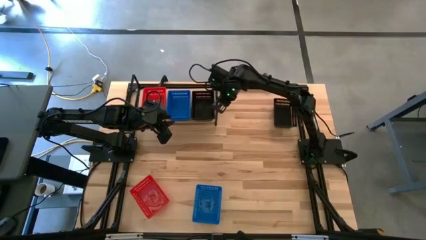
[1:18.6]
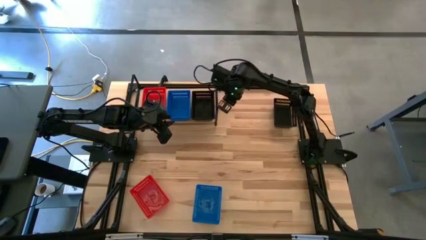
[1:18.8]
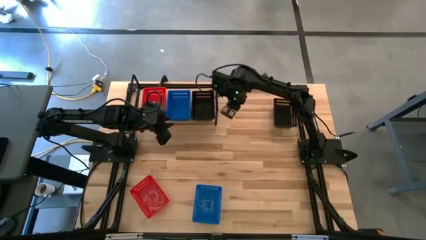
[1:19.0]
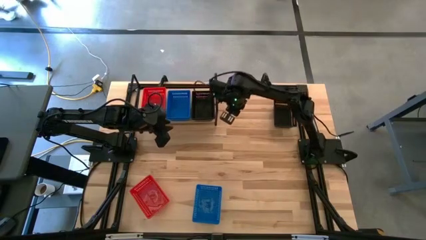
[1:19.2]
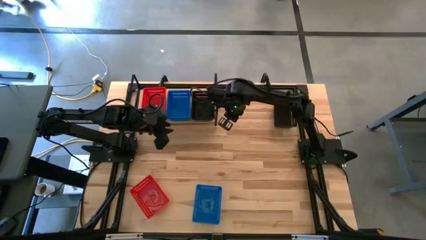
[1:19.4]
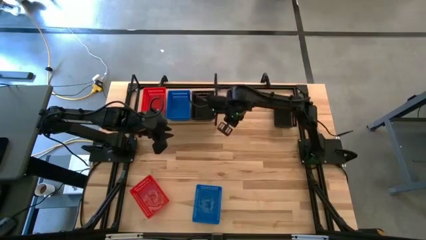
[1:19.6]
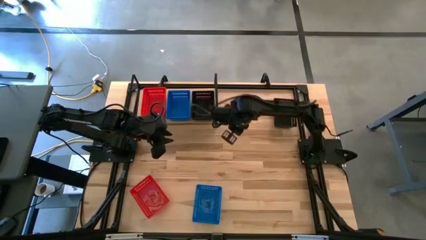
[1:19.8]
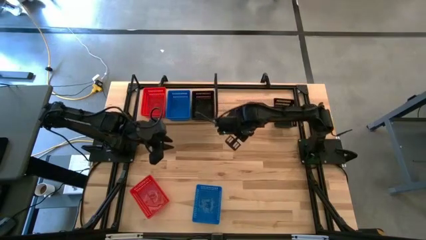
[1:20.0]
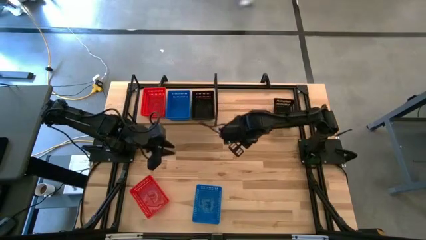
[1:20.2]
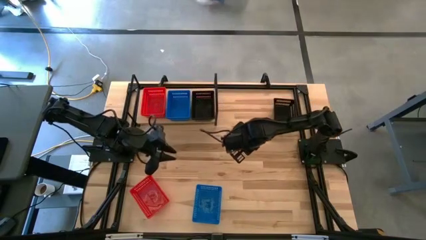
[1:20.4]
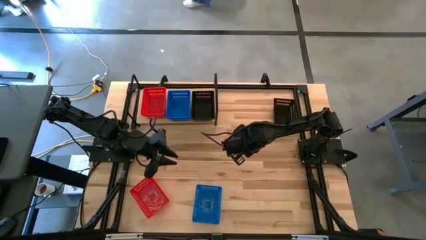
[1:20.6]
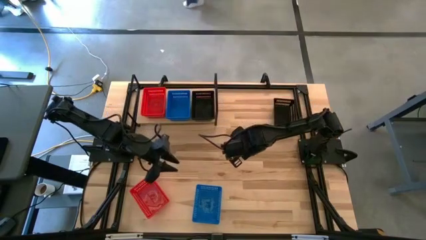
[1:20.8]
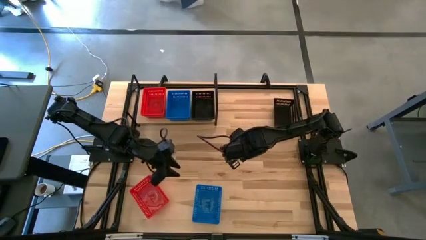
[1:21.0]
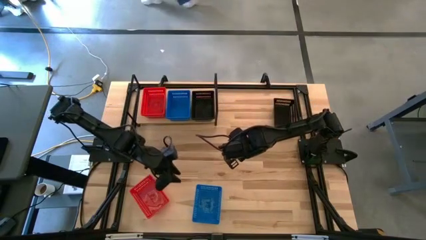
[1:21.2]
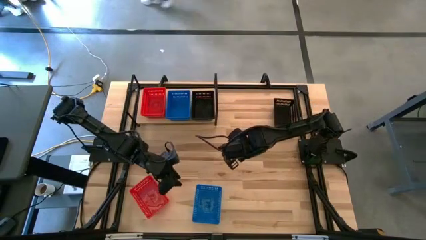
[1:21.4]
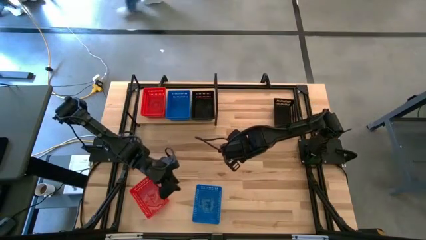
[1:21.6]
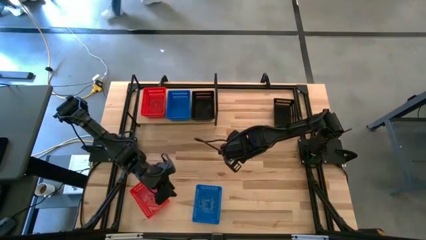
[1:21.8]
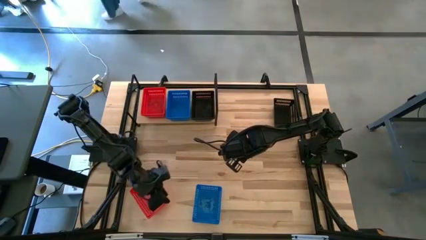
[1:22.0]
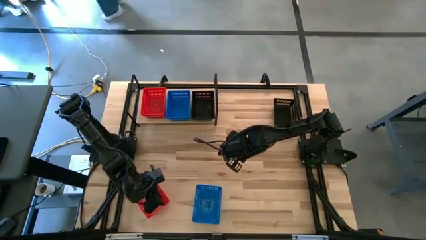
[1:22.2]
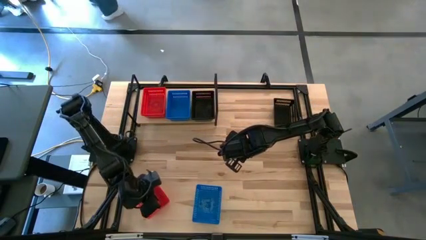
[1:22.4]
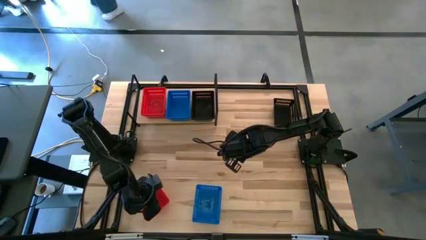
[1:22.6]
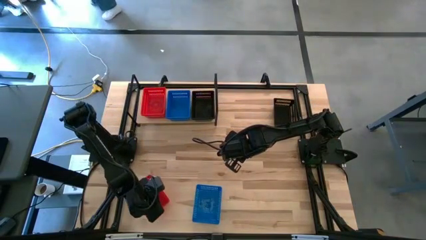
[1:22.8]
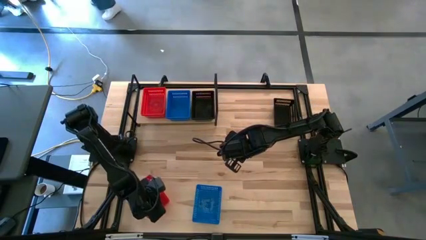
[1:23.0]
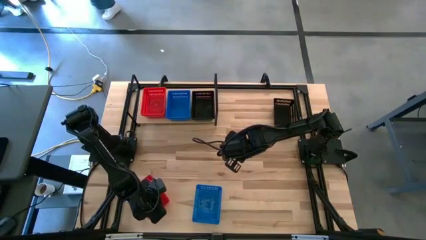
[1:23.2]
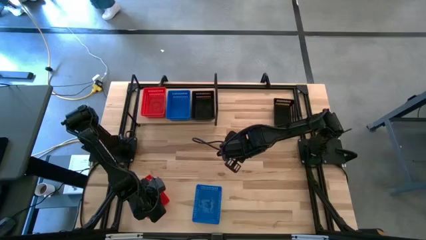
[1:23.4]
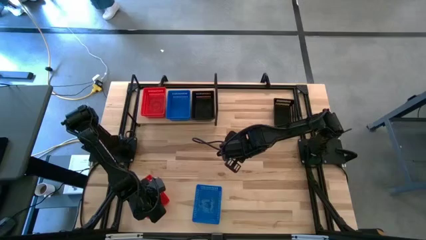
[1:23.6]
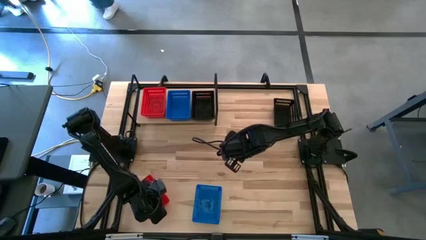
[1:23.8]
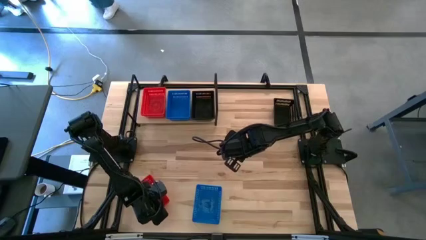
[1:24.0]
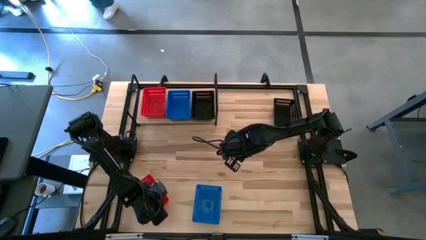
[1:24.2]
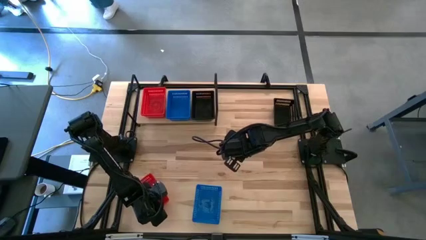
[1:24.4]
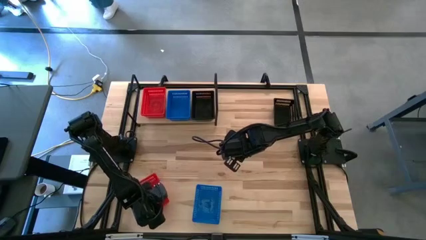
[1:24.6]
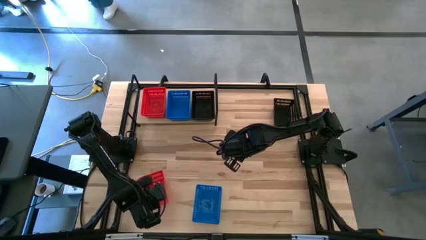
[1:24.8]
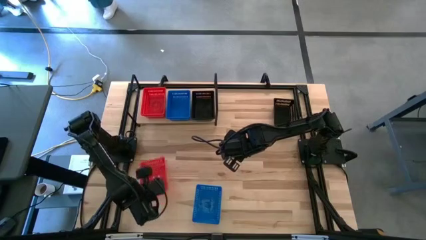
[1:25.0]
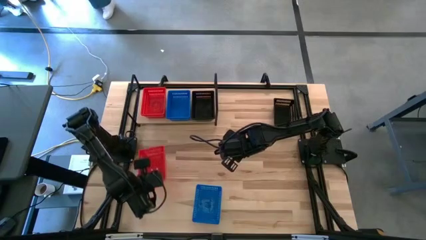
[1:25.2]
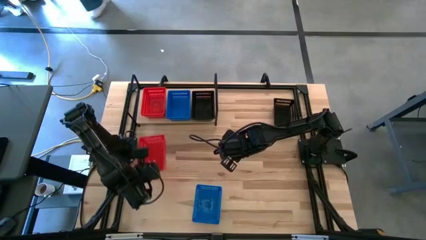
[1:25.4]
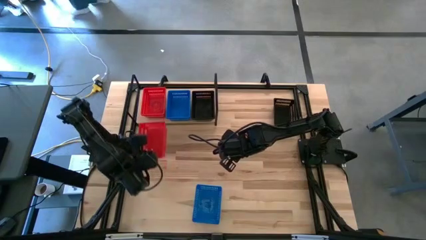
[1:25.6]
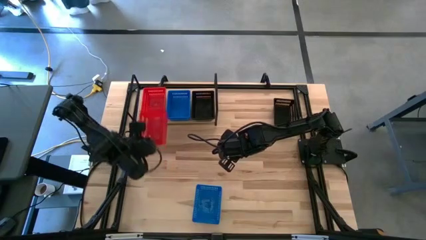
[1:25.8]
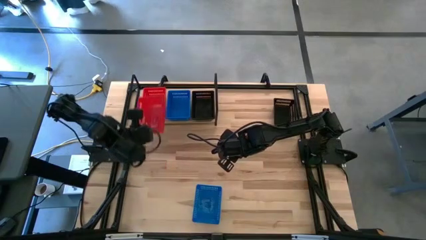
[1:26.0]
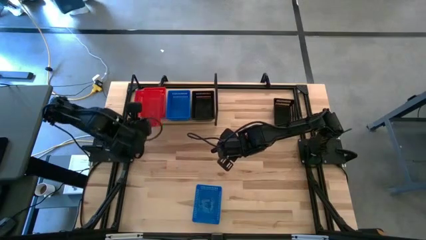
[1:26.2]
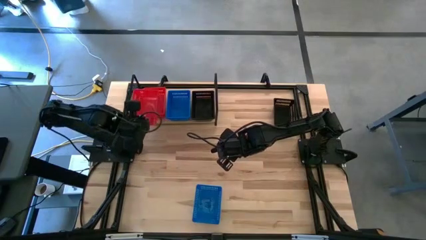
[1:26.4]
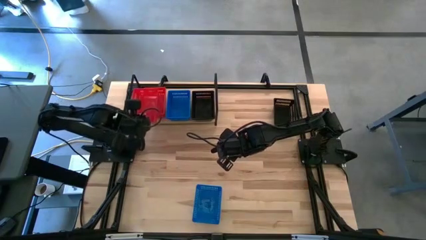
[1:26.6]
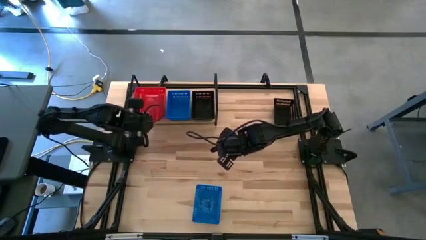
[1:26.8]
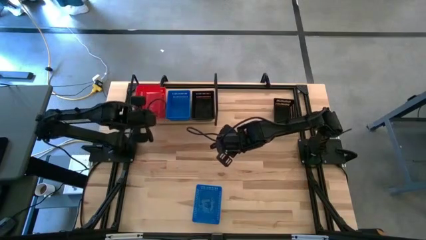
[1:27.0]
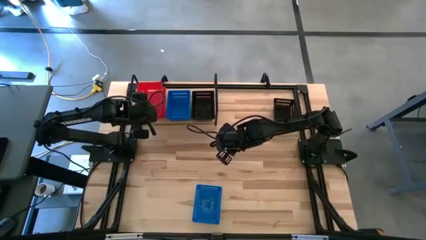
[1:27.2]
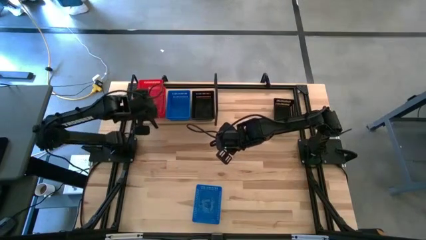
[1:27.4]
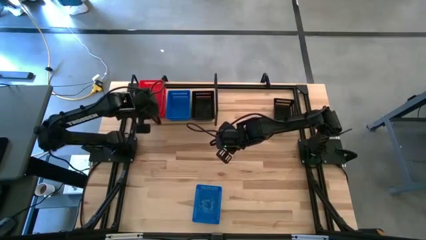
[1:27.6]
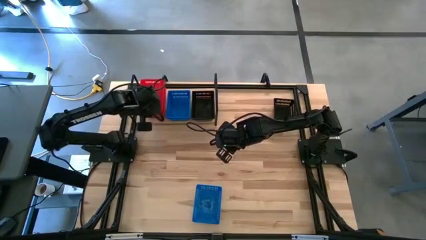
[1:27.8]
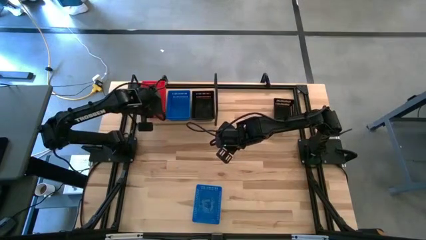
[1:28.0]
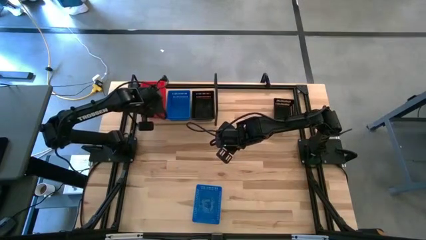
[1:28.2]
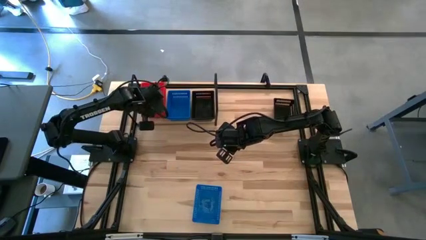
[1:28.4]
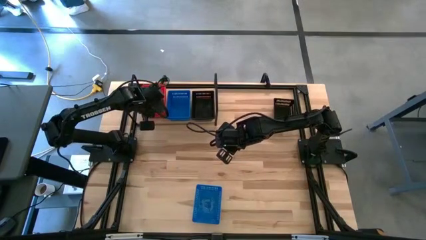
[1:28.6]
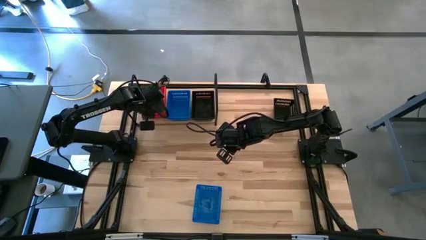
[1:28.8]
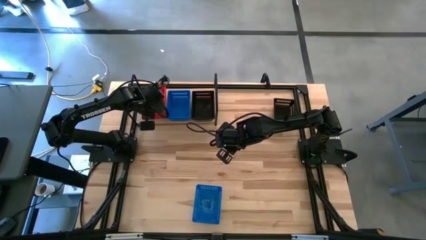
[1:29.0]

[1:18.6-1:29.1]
Task: Stack baskets on shelf by color
Stack the red bin on the other red bin
